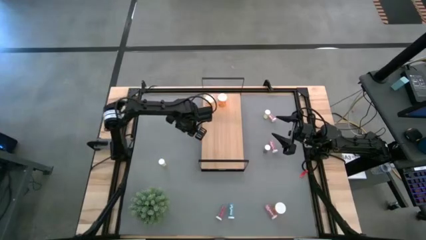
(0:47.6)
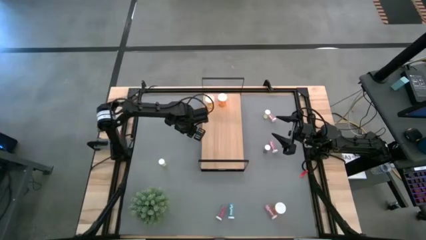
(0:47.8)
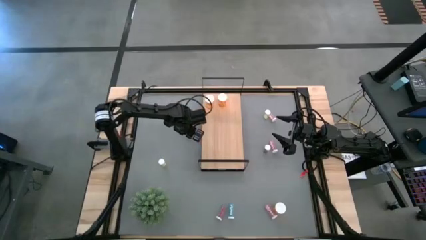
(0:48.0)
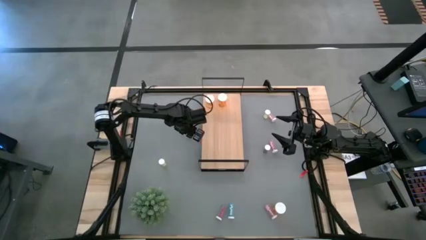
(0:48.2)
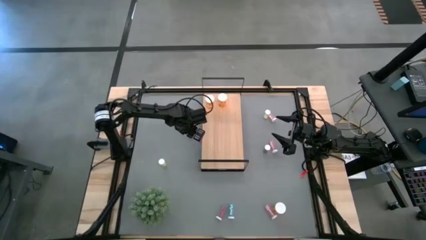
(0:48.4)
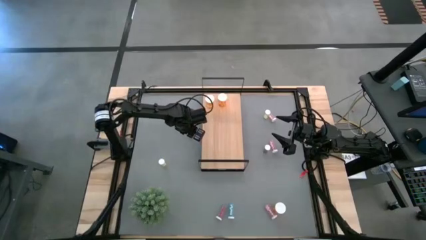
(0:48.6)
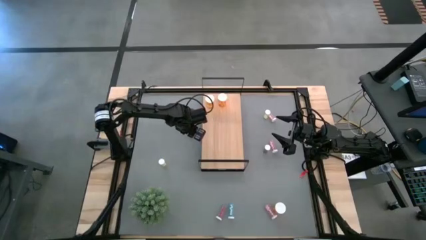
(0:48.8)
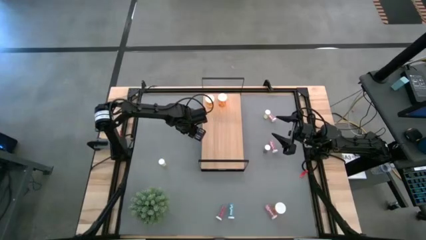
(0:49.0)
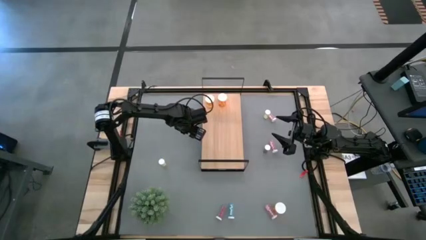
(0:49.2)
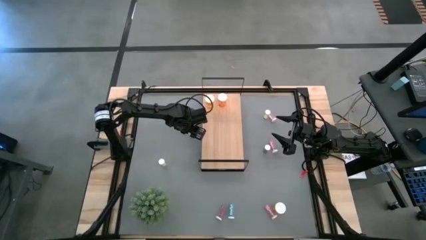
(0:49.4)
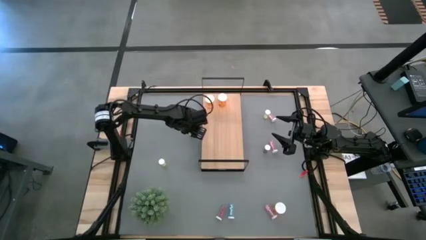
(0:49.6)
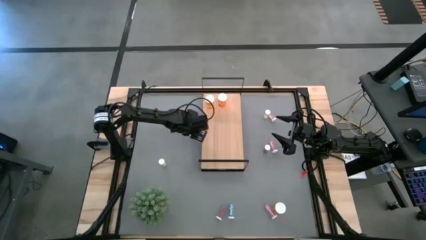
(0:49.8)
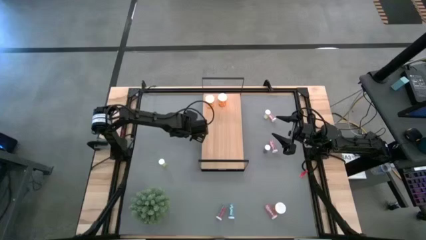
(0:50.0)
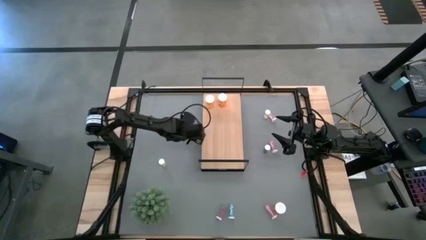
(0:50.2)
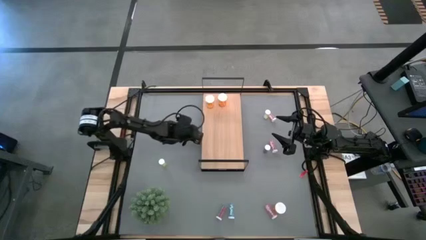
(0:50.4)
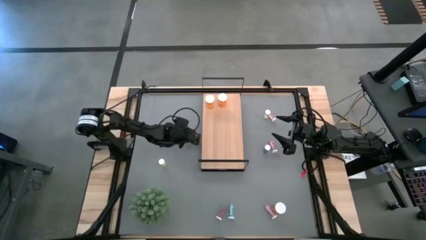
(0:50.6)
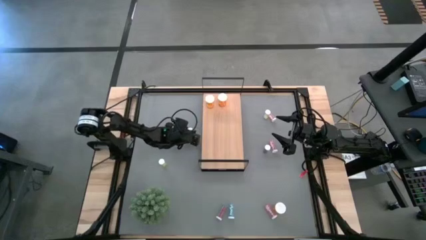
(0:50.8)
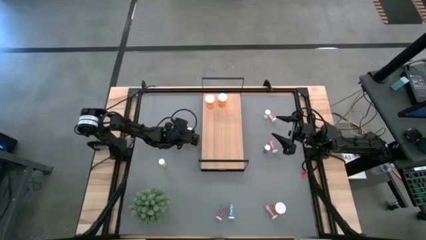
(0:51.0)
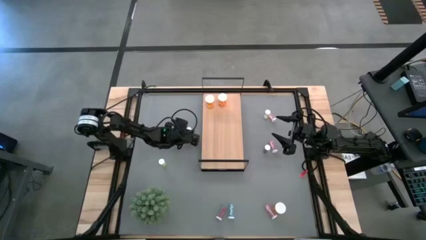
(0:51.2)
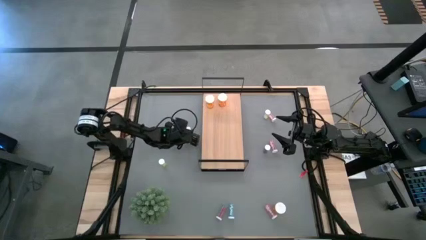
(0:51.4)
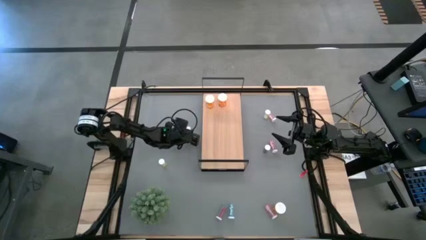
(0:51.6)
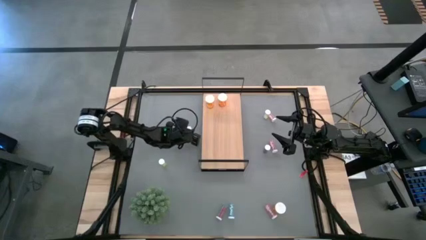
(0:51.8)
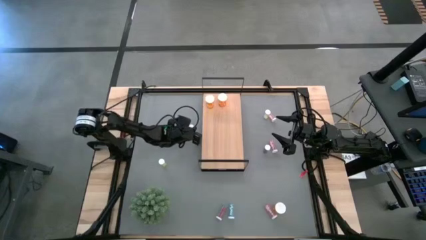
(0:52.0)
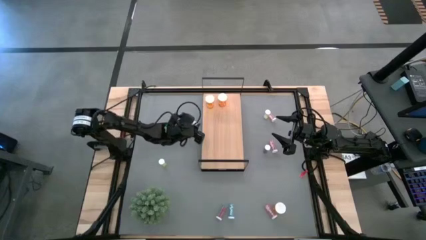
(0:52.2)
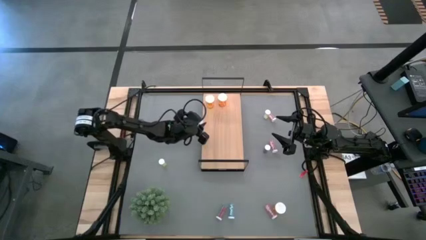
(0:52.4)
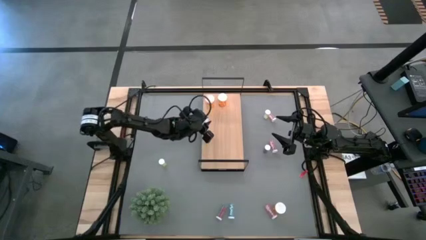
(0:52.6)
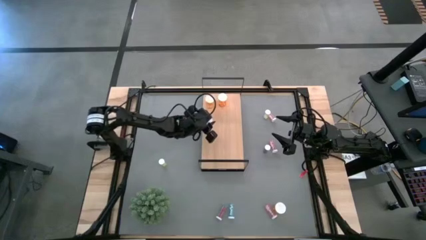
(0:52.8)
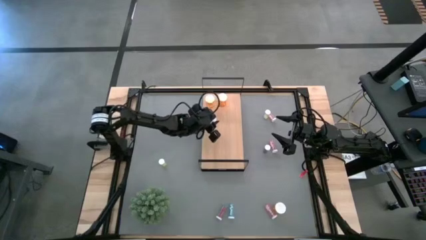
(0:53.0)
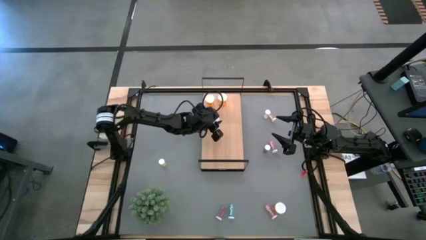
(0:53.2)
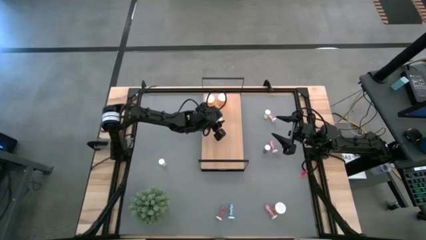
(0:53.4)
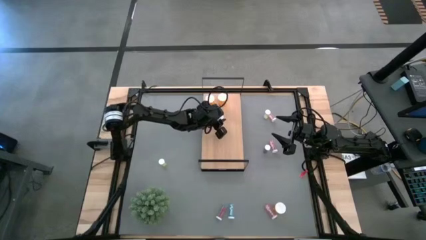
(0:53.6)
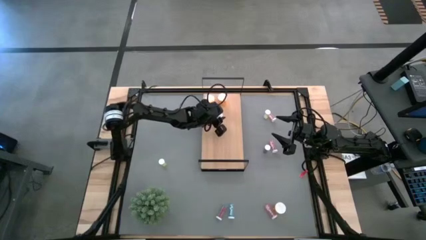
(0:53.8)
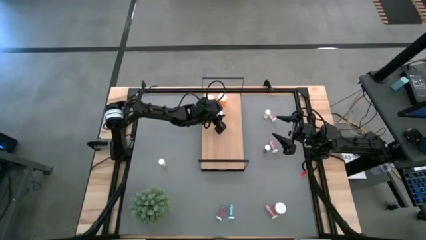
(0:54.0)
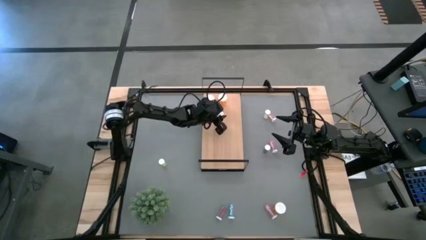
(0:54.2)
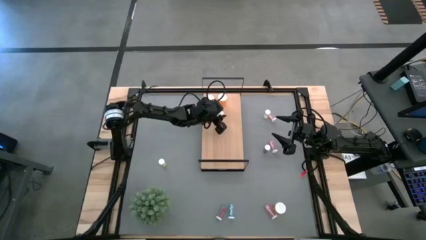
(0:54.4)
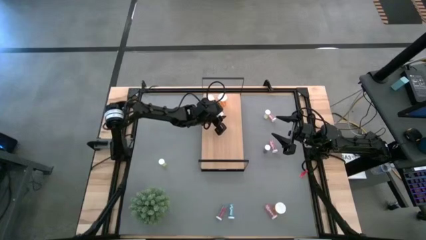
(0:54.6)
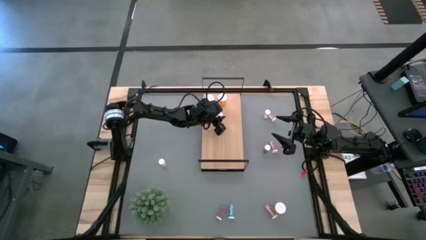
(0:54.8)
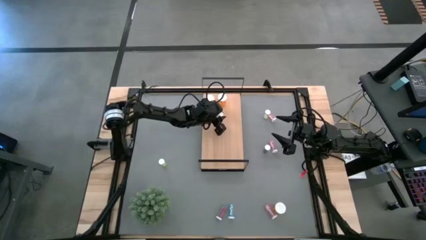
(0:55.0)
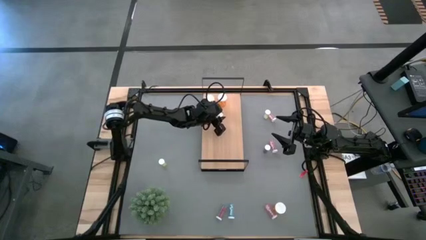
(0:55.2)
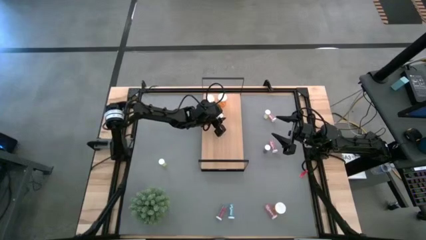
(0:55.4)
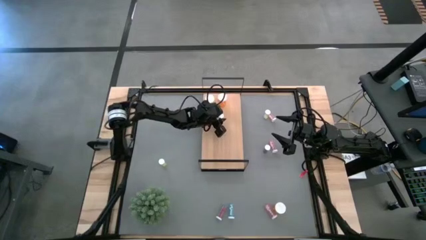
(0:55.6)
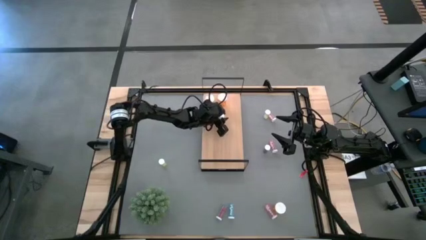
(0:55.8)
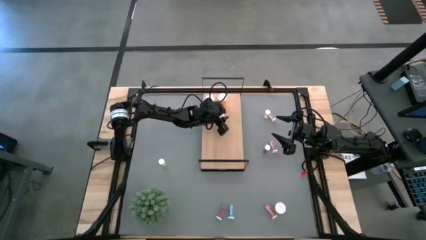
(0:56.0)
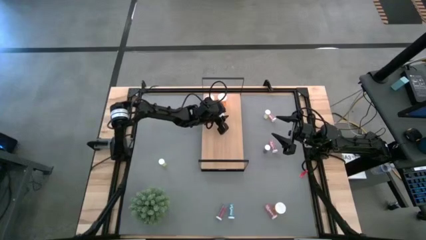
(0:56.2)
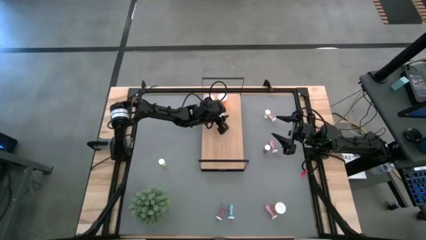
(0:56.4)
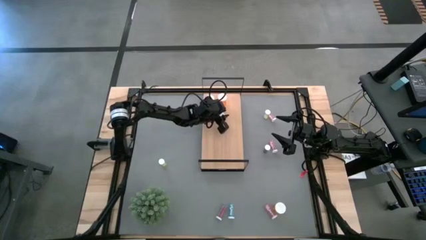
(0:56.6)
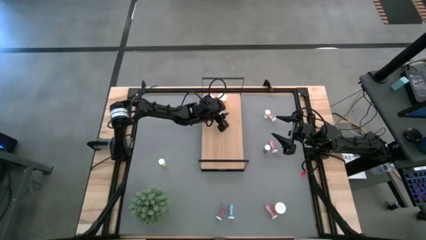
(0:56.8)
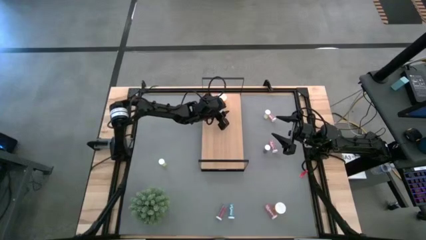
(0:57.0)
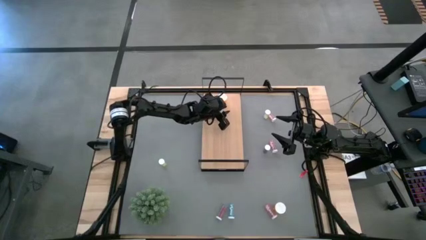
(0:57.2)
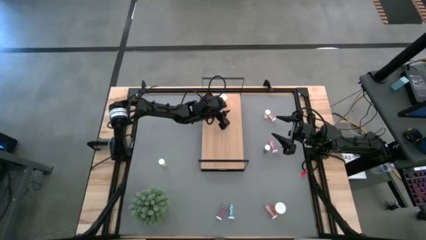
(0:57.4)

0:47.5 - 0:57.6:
Task: Pick and place medicine bottles onto shelf by color
Put the middle yellow pill bottle on the shelf

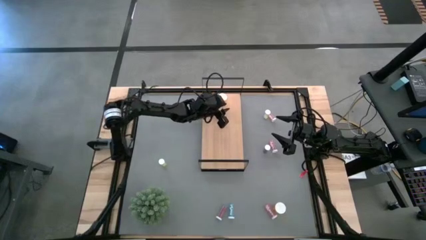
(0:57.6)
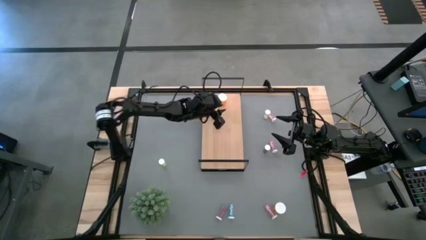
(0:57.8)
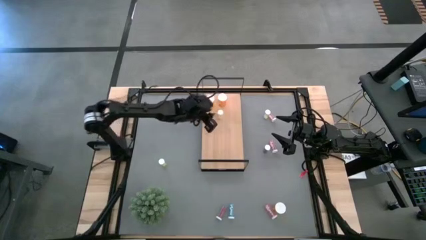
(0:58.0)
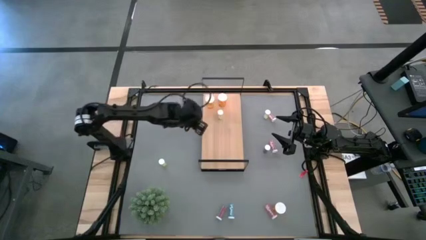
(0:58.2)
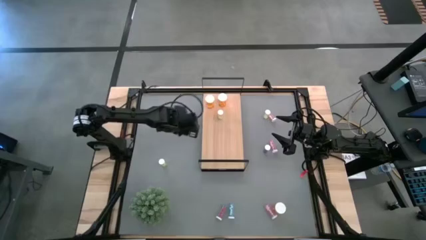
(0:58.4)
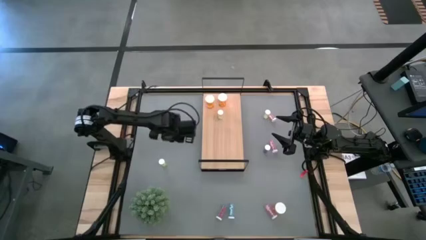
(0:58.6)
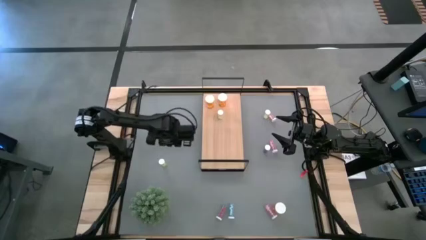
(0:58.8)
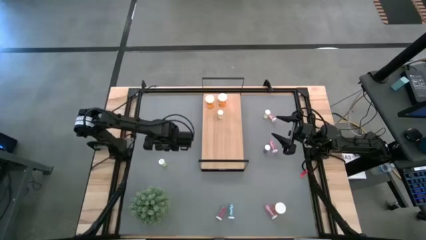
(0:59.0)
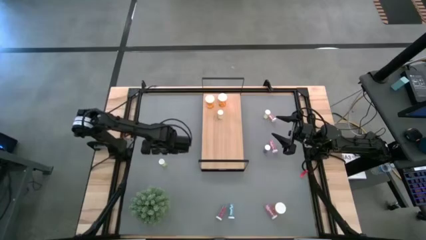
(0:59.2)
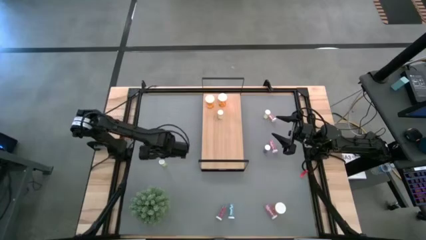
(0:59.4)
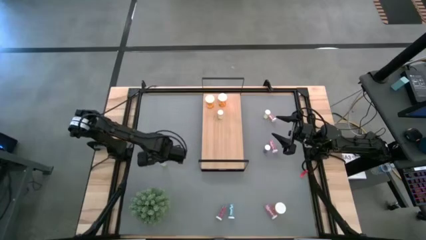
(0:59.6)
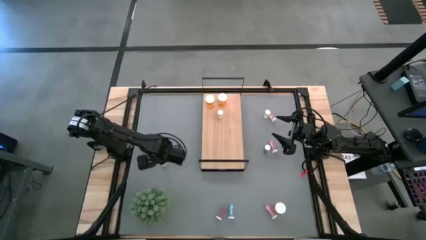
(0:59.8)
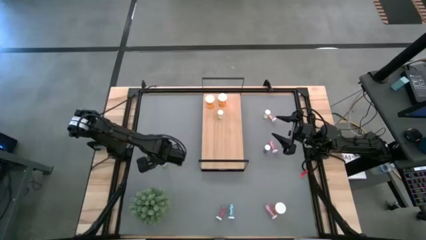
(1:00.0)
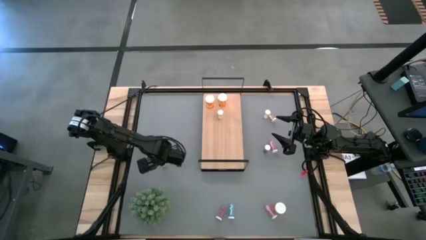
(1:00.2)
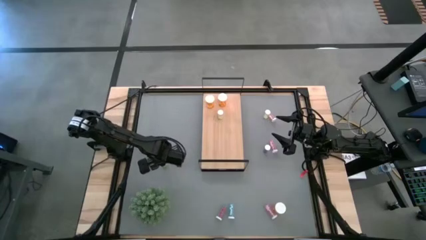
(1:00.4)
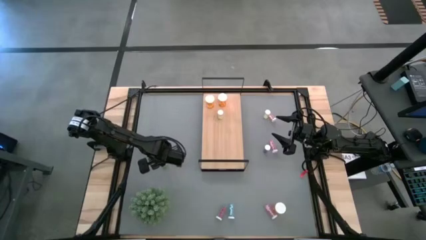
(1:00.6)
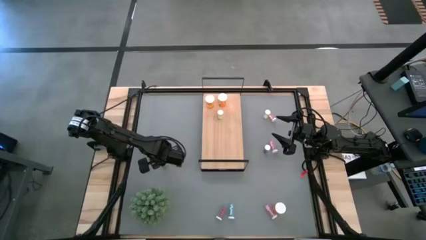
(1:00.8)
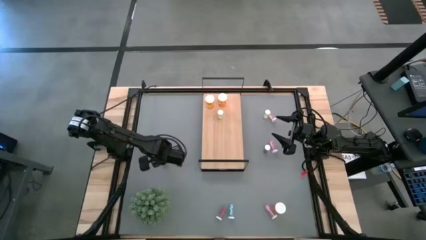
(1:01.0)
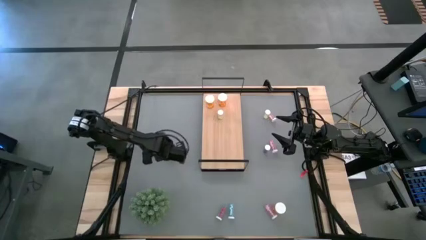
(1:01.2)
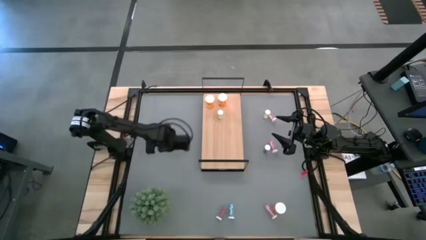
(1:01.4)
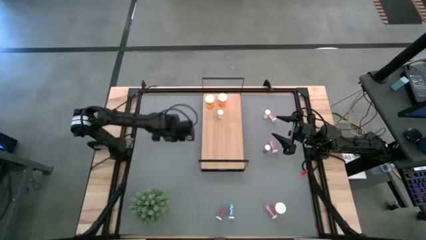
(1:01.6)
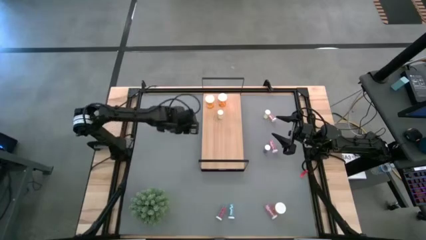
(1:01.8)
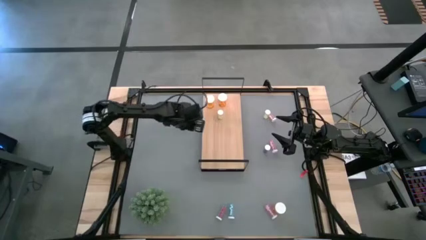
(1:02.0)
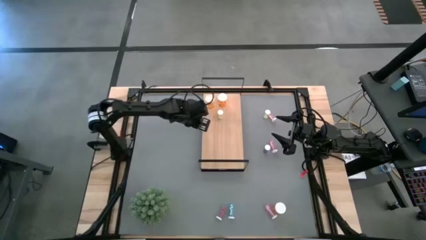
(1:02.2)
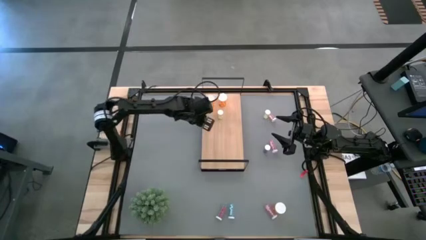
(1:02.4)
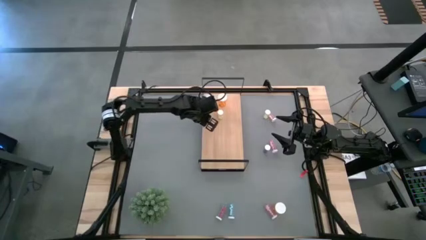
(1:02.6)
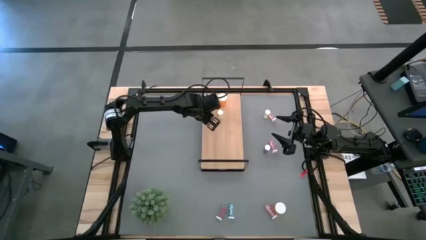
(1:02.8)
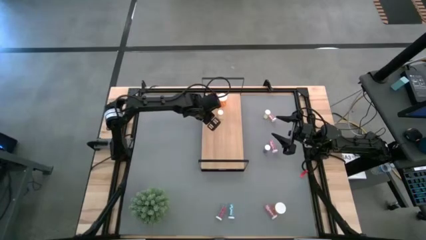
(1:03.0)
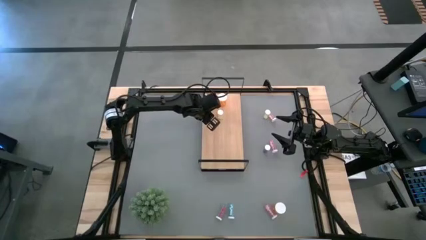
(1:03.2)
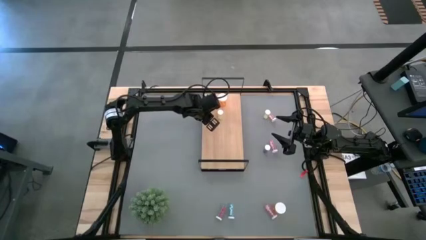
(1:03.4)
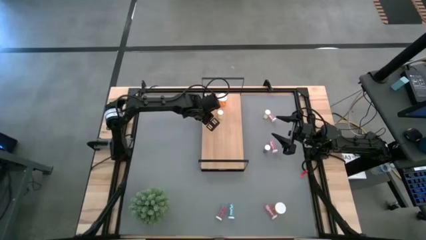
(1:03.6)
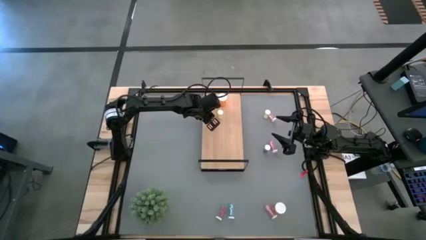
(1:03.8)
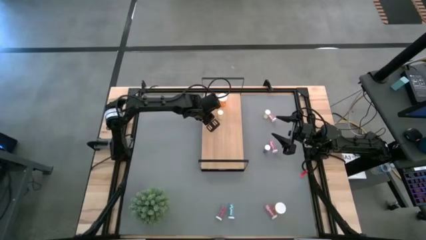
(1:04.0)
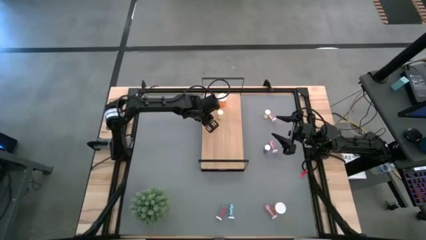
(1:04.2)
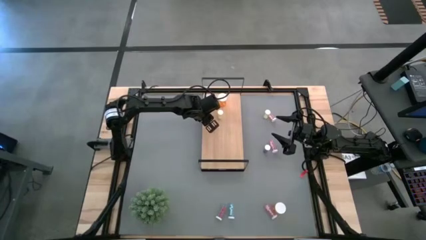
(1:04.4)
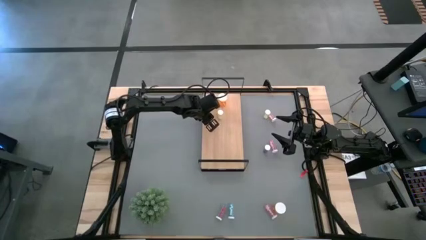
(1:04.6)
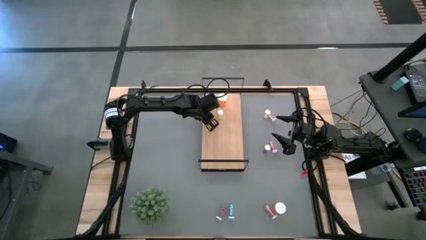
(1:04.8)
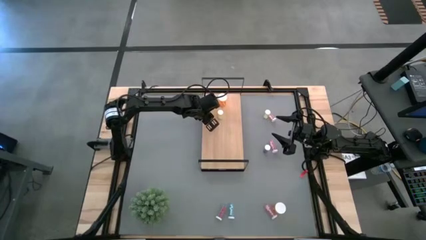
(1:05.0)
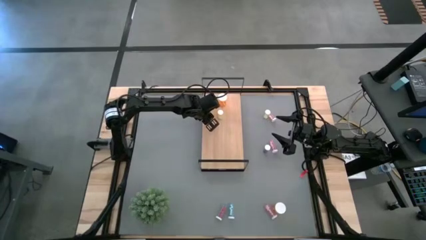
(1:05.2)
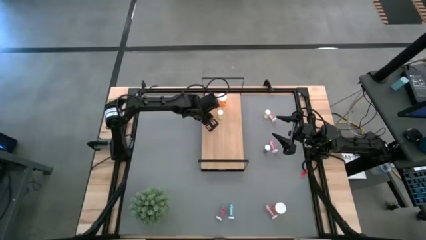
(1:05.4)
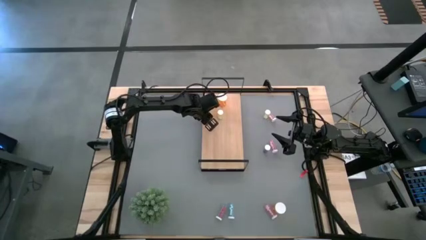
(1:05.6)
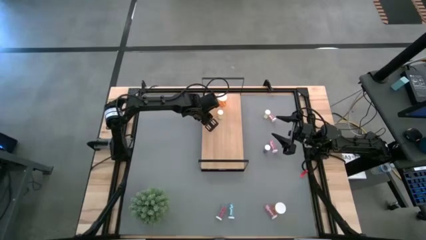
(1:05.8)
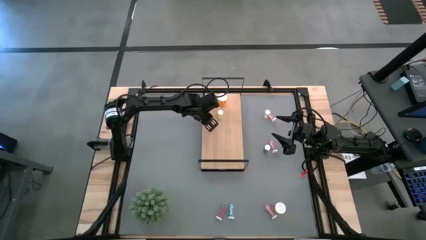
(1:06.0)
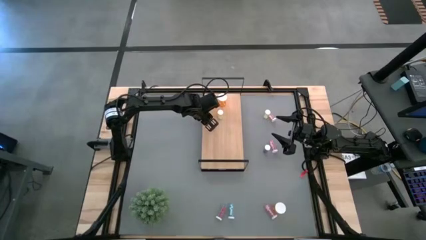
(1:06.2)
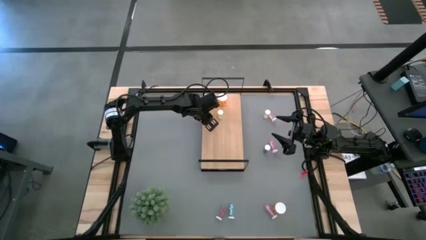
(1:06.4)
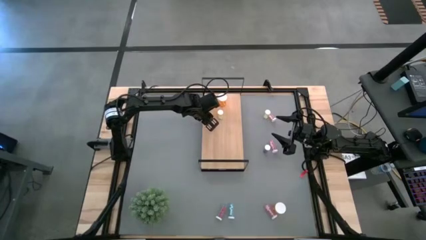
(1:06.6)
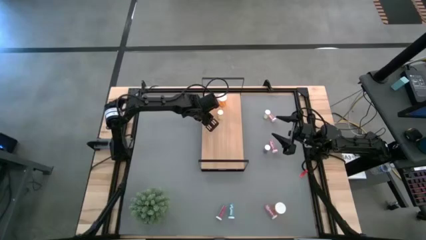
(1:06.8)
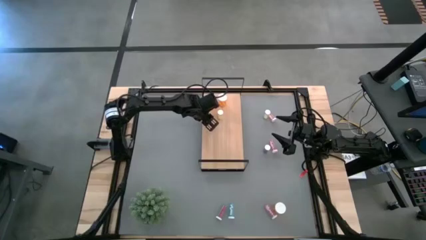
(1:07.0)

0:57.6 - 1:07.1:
Put the bottom yellow pill bottle on the shelf aligned with the other yellow pill bottle
